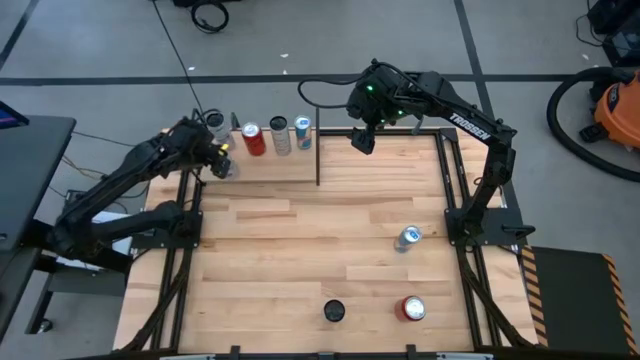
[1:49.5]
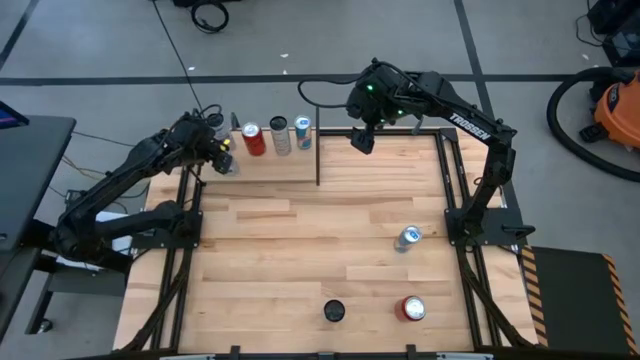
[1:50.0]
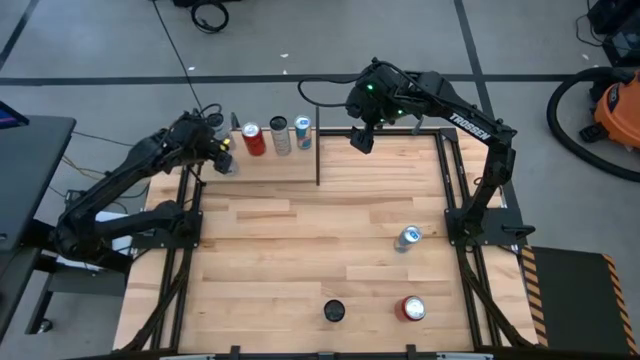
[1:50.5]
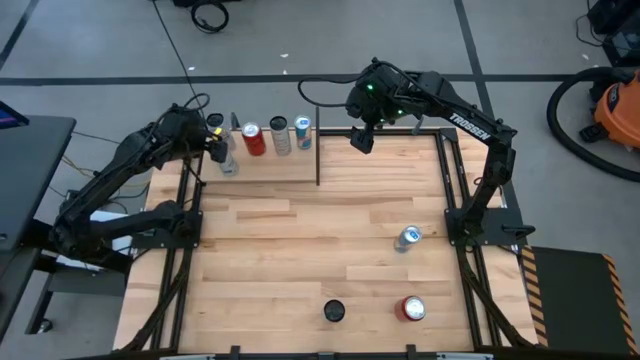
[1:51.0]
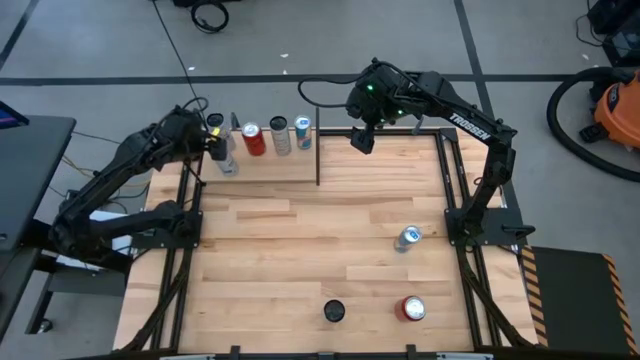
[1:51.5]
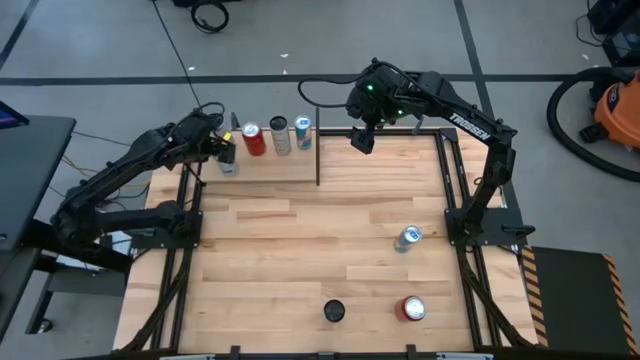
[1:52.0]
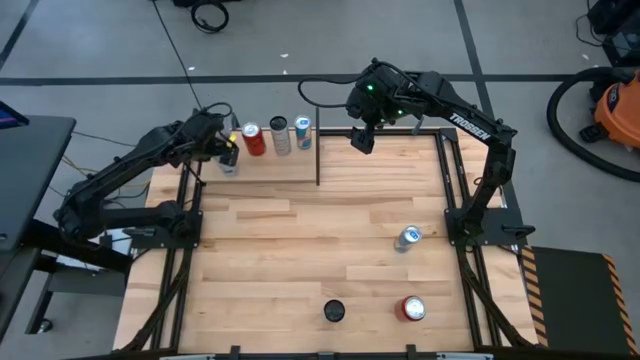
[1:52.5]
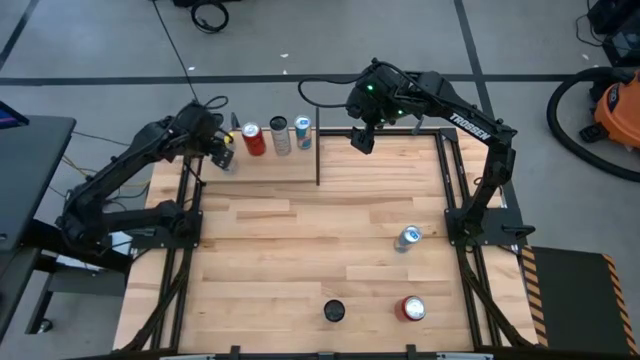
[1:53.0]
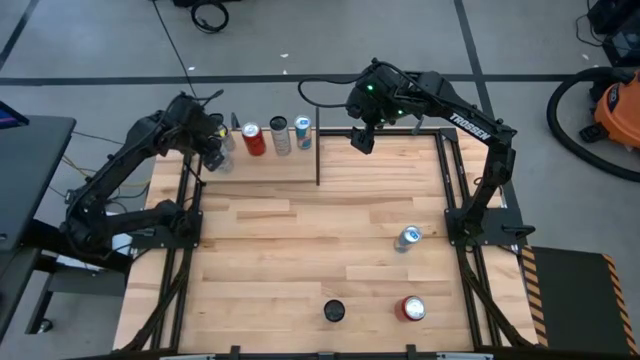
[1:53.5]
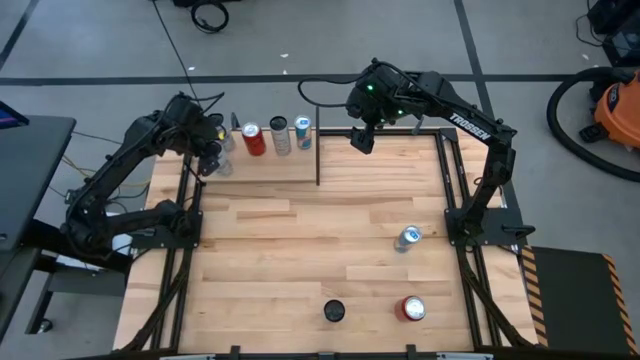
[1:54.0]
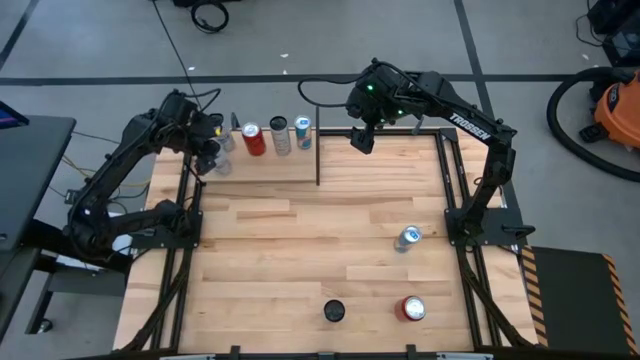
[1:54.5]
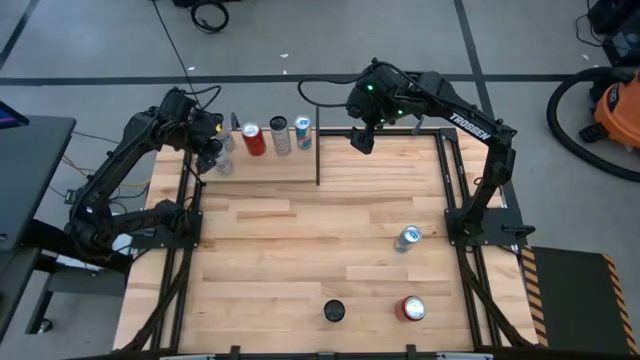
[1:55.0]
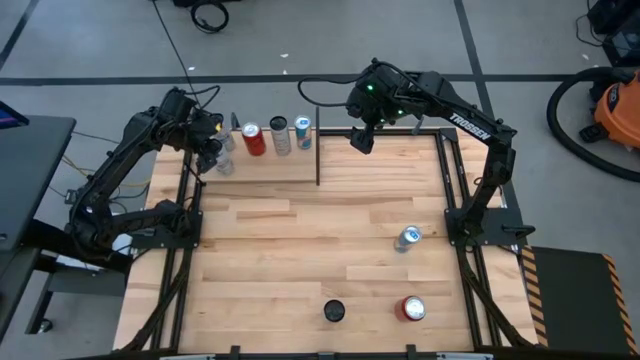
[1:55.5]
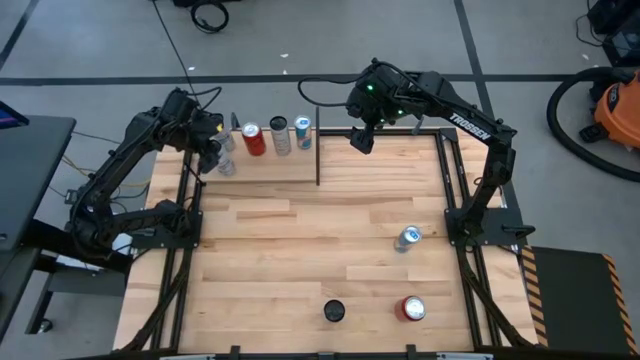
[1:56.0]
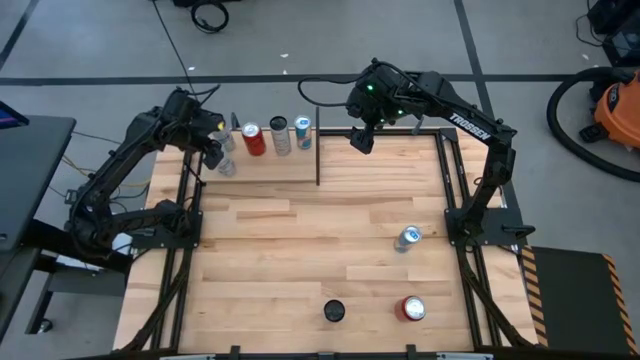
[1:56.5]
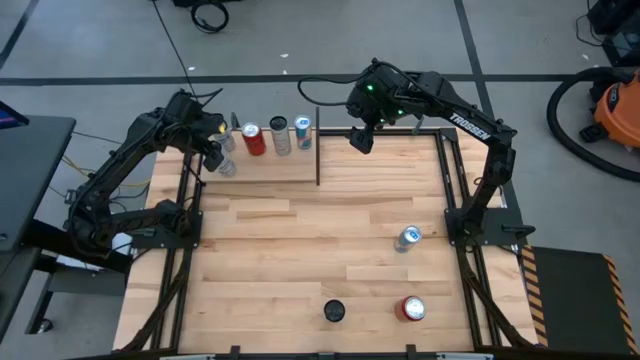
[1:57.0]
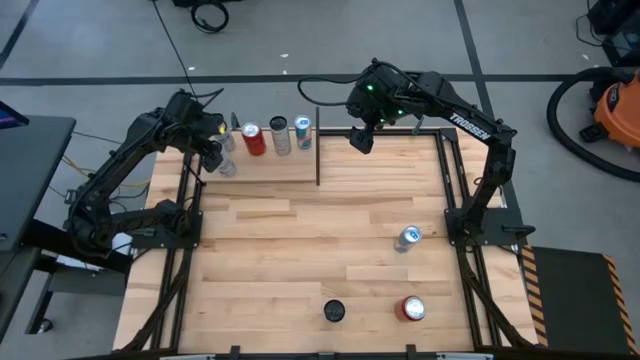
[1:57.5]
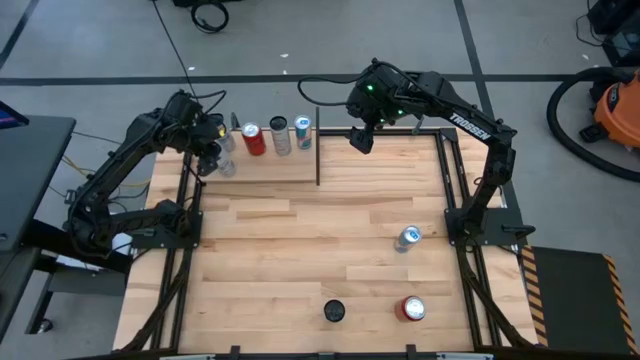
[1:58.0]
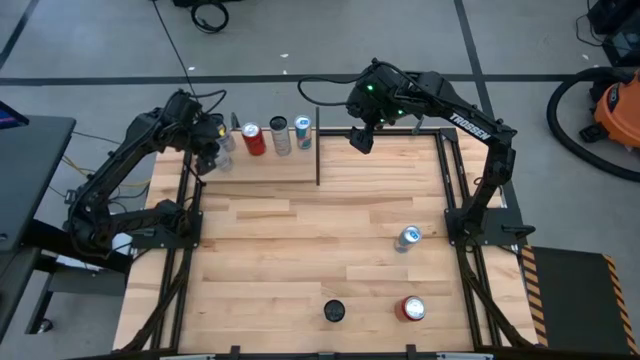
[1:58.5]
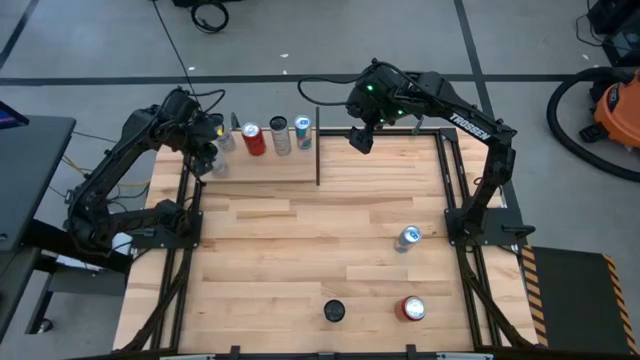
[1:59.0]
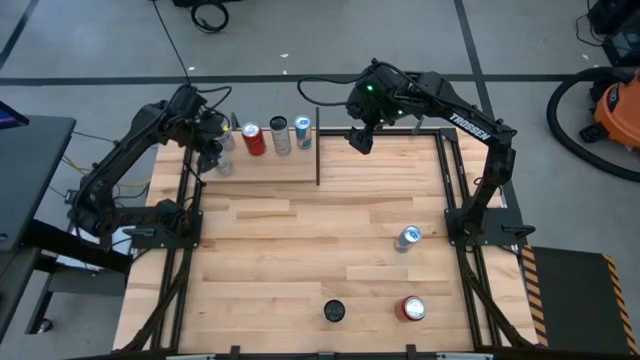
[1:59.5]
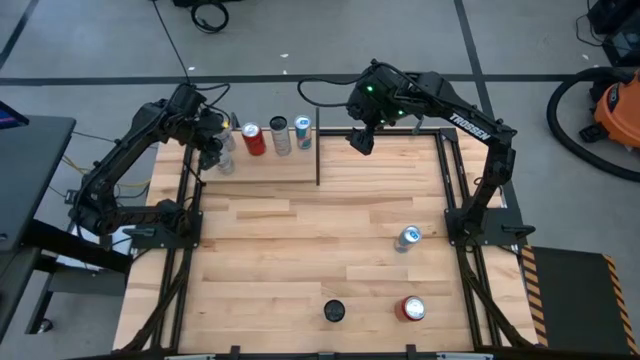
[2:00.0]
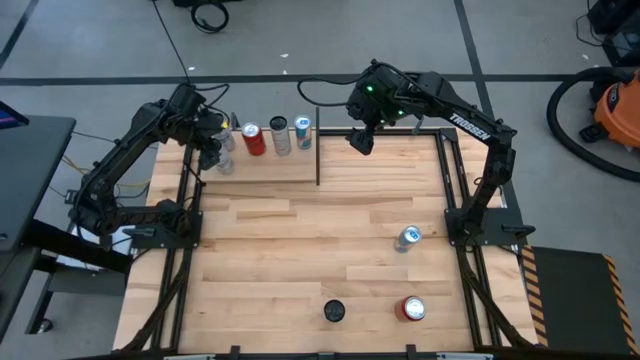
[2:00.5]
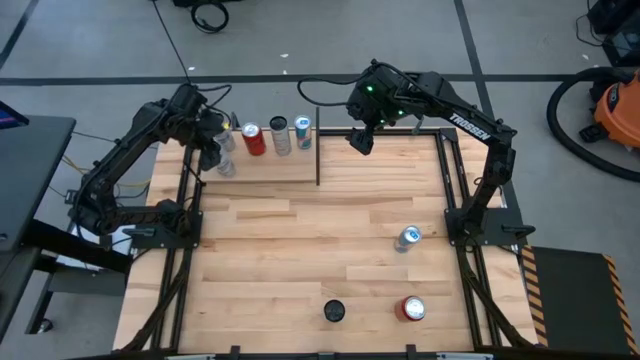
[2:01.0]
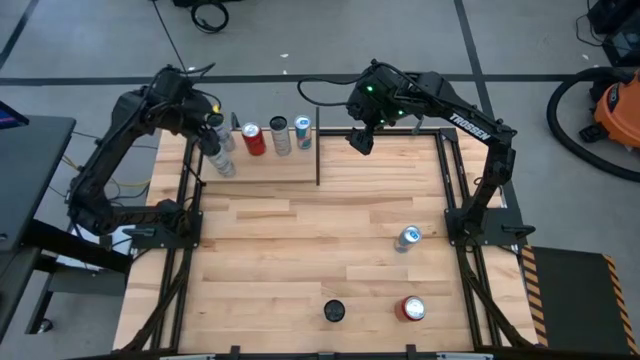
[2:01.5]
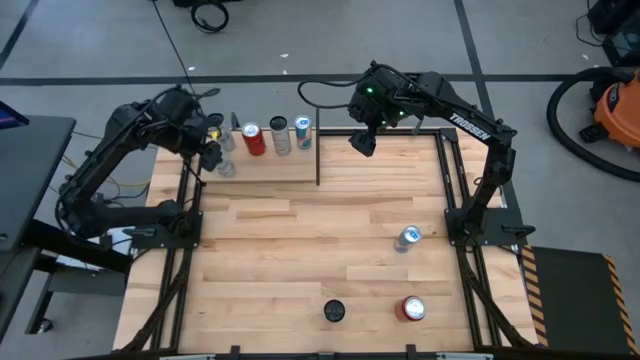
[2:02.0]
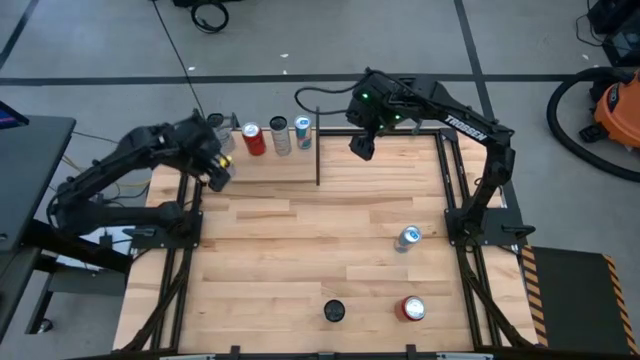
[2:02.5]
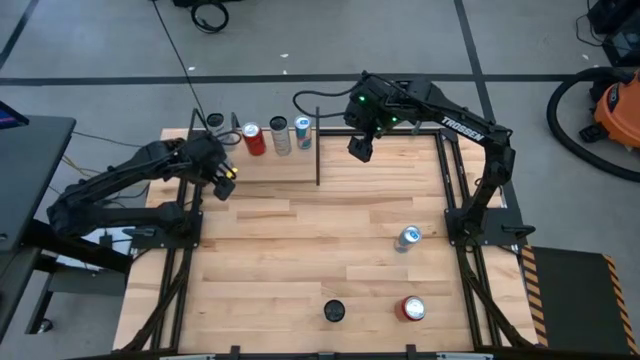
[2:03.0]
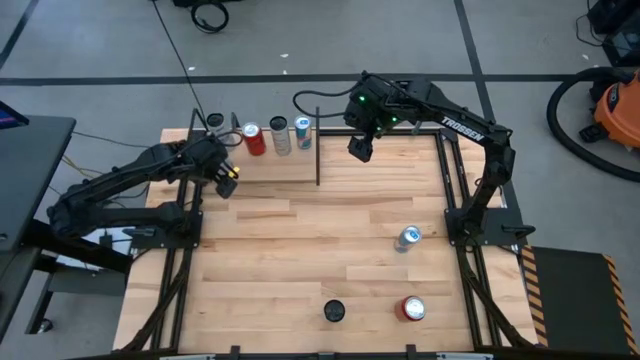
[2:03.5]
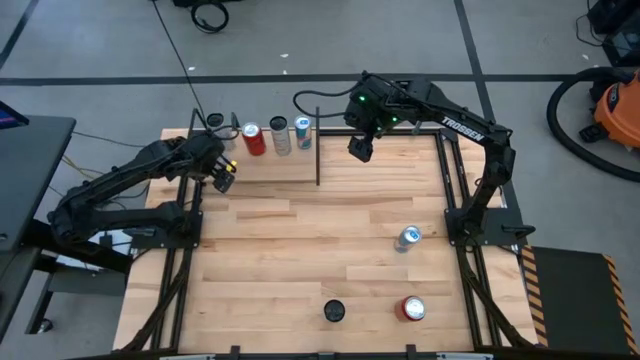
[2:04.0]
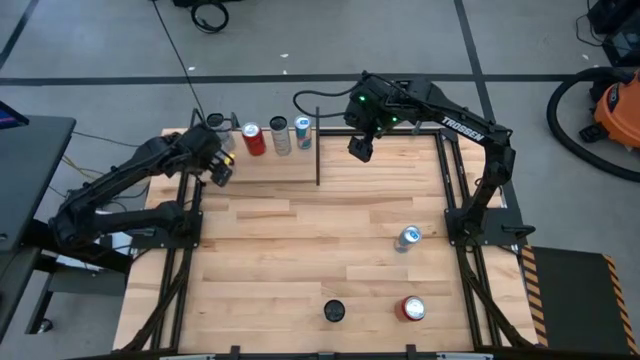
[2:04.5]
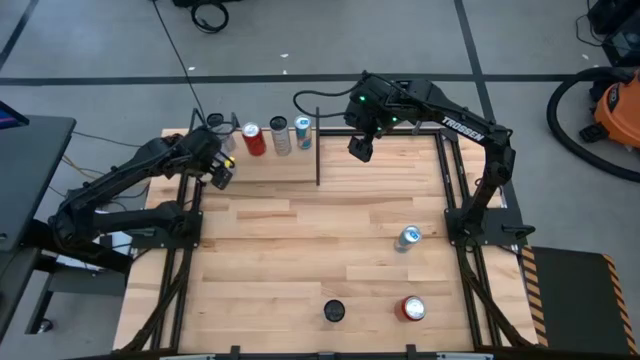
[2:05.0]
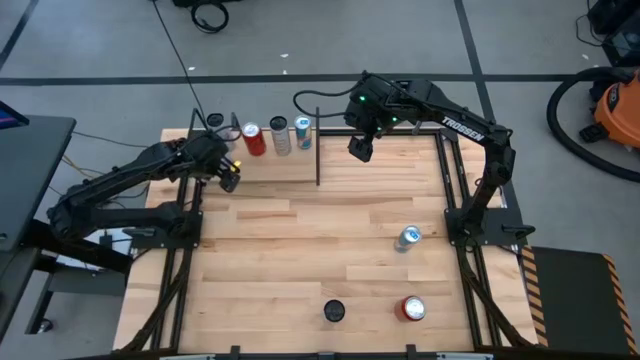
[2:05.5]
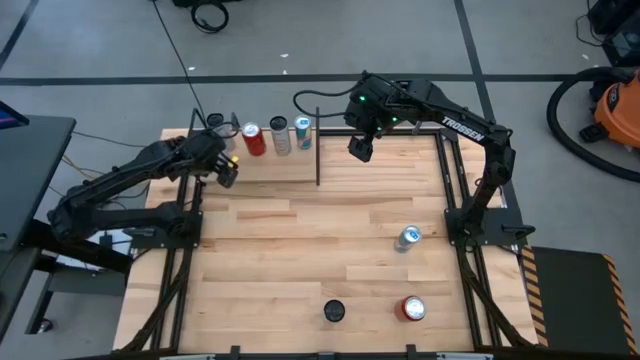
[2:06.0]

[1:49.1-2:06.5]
Task: Place canned beverage on shelf
Put the blue-white soda can on the shelf aligned with the other blue-white soda can
